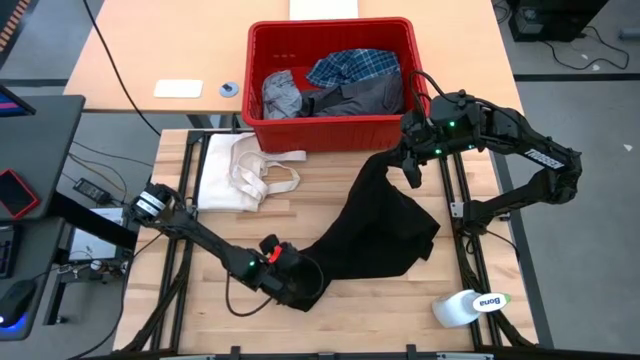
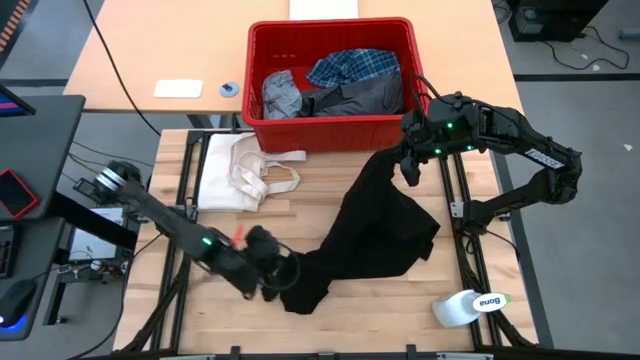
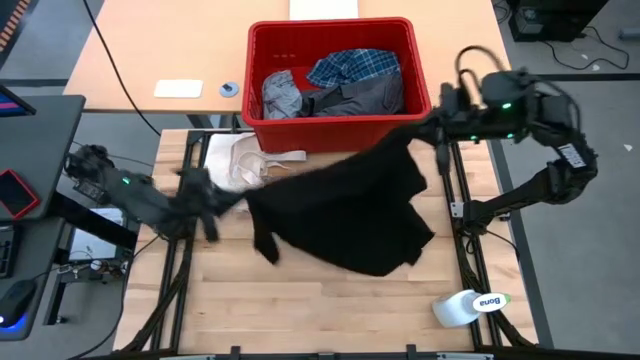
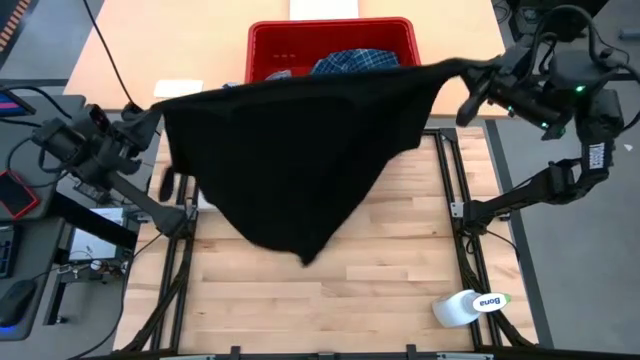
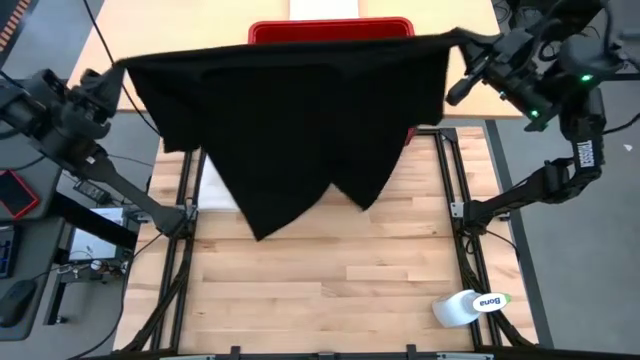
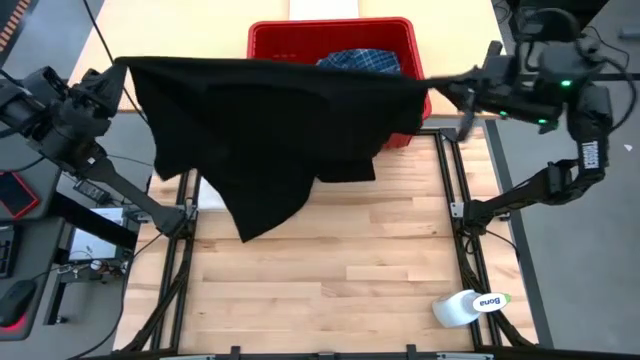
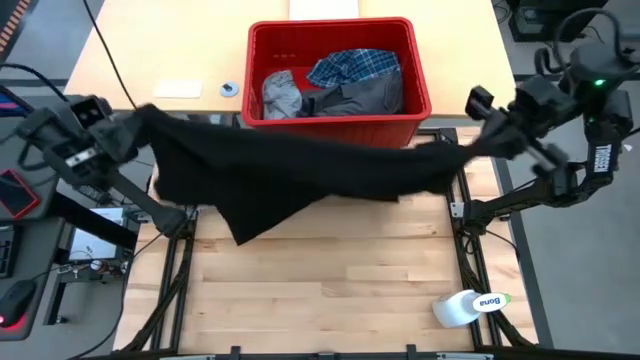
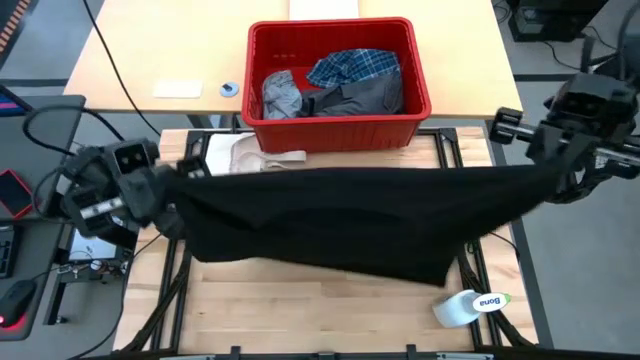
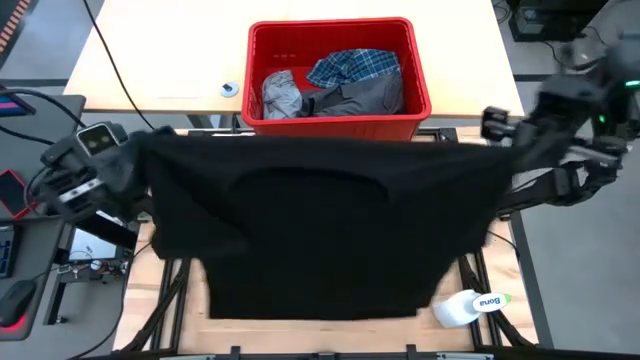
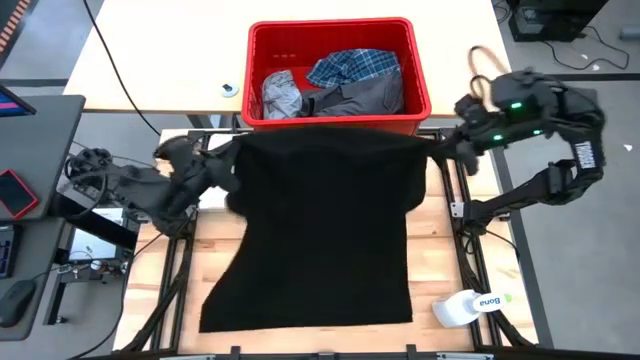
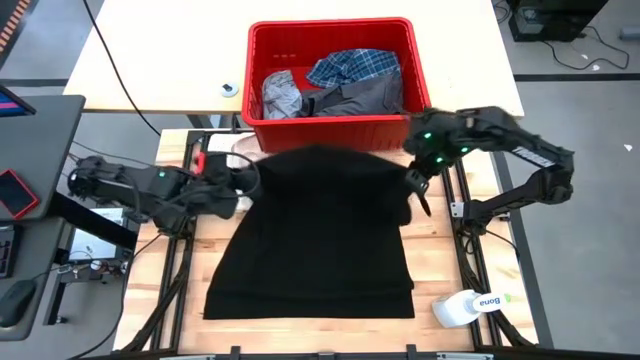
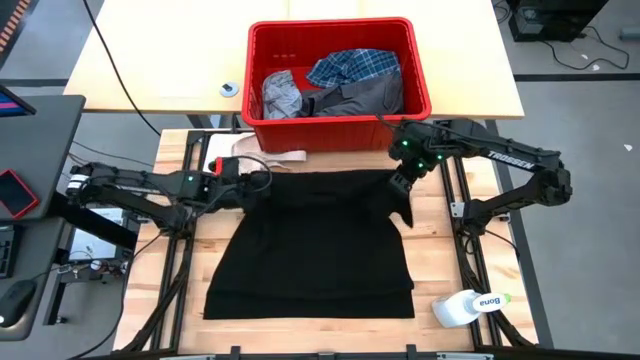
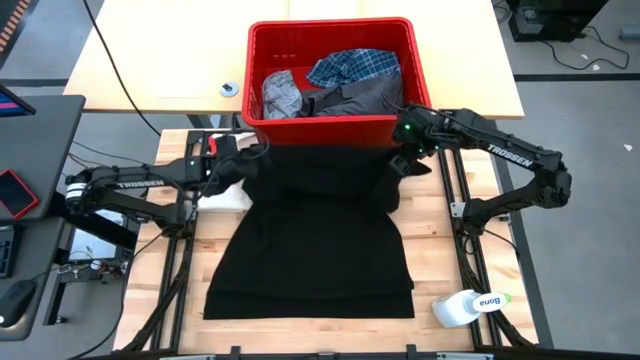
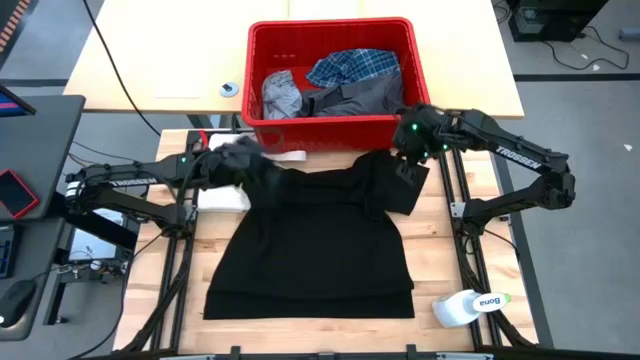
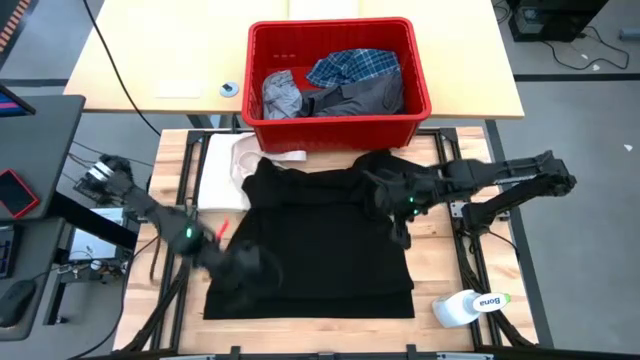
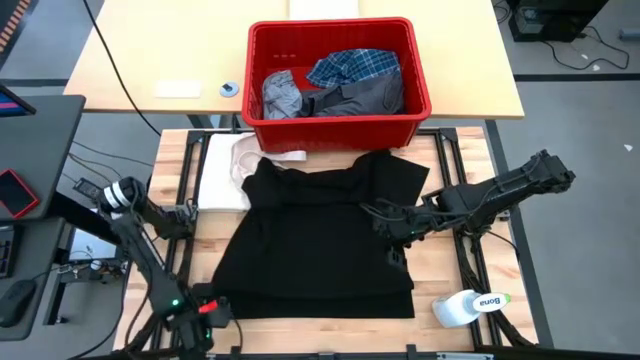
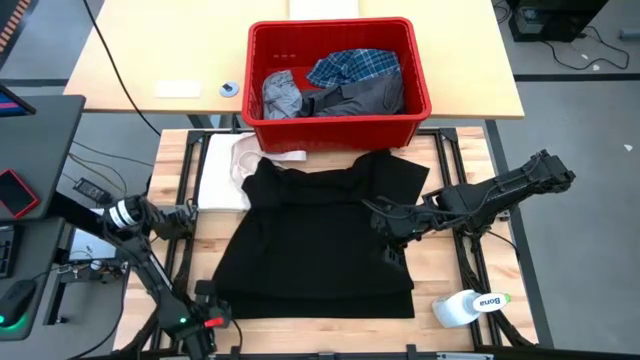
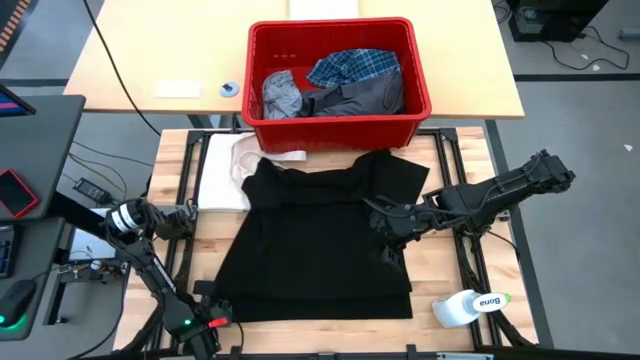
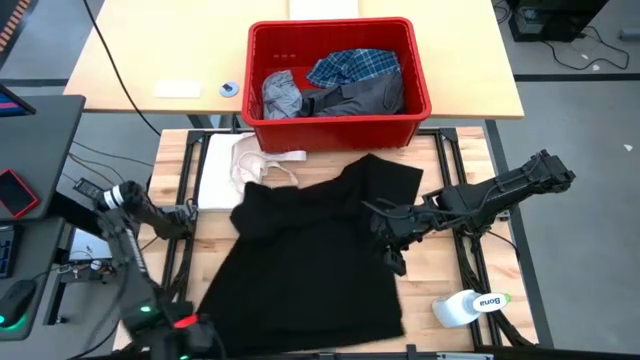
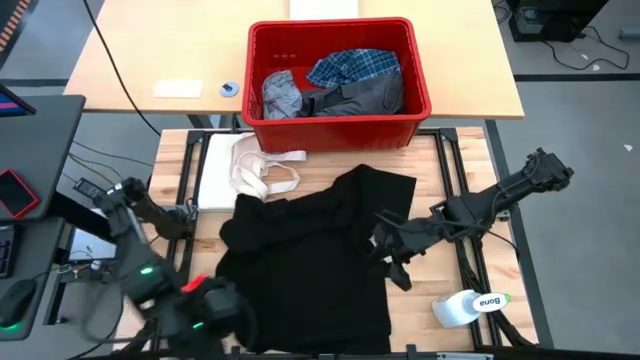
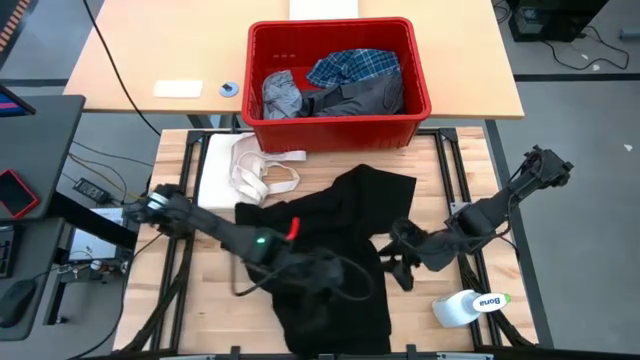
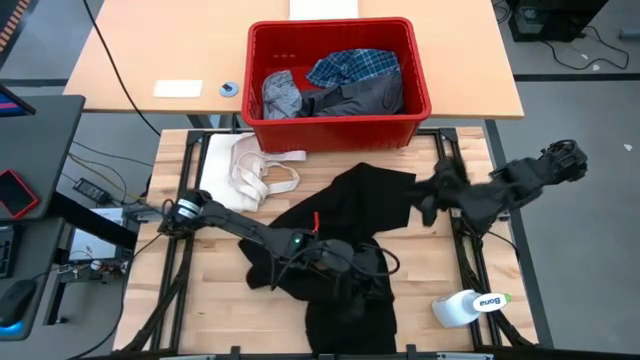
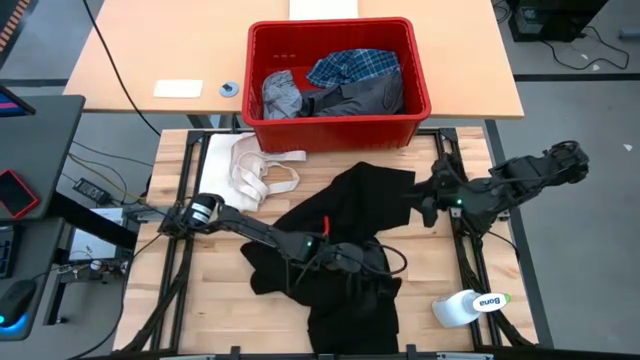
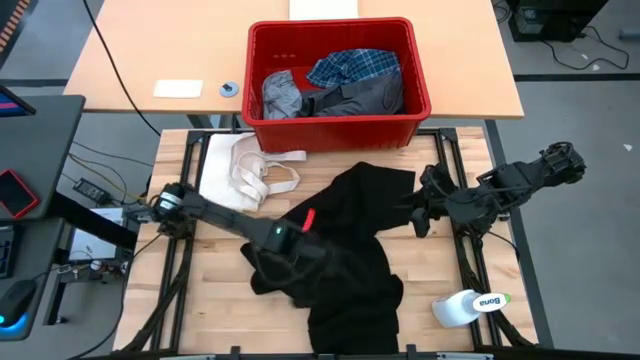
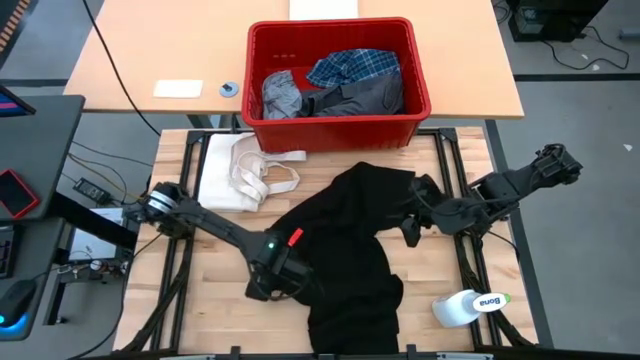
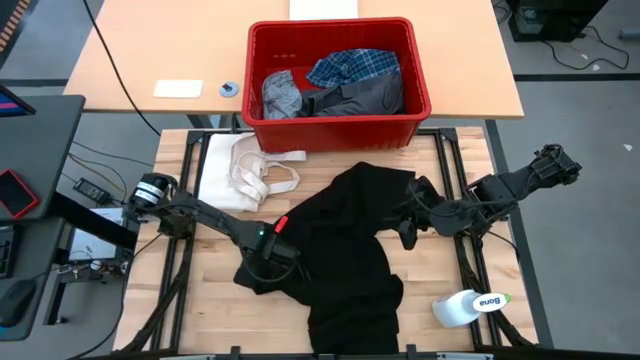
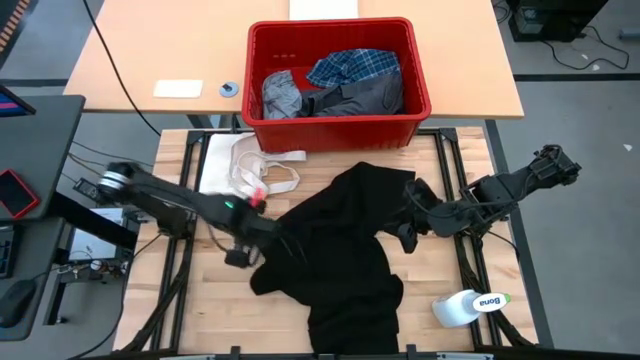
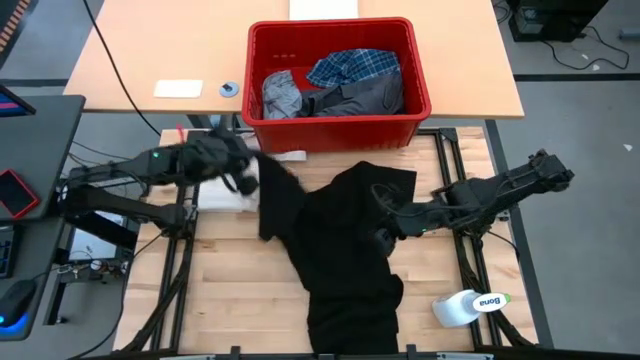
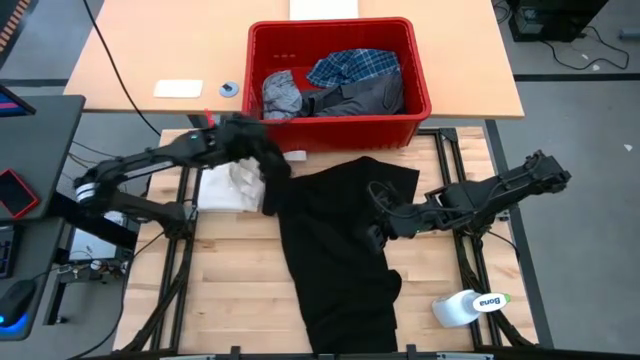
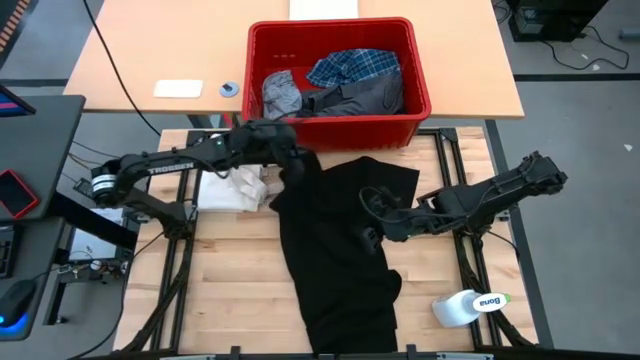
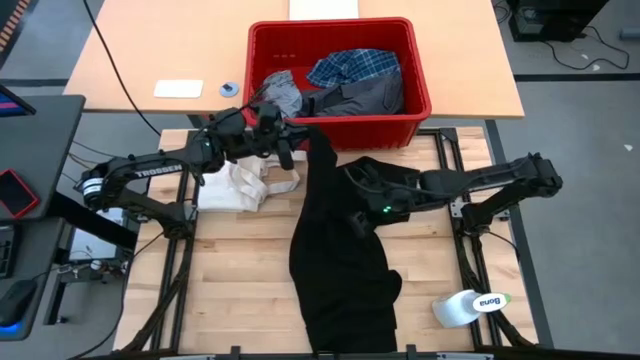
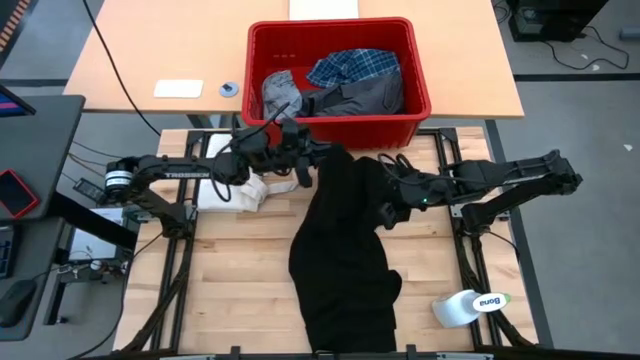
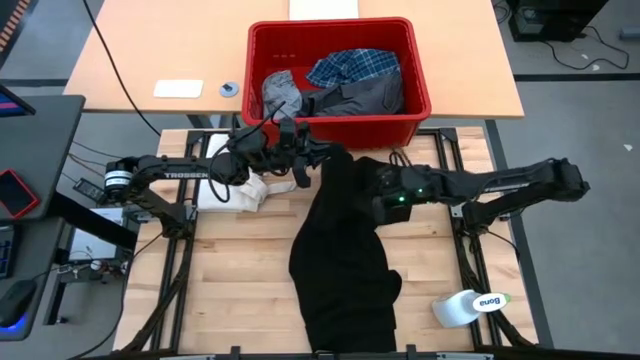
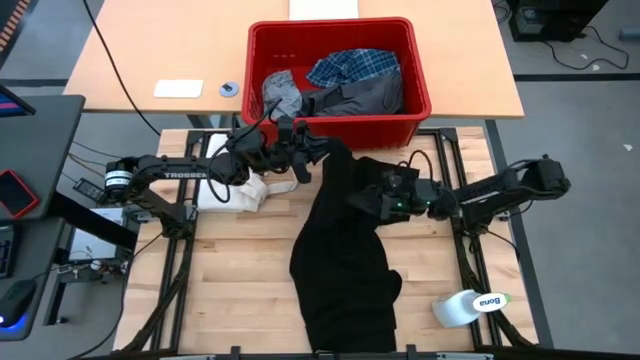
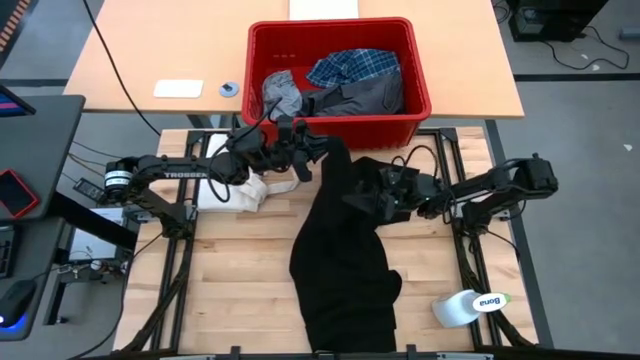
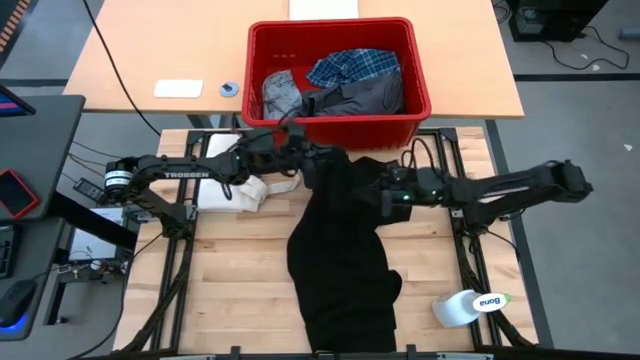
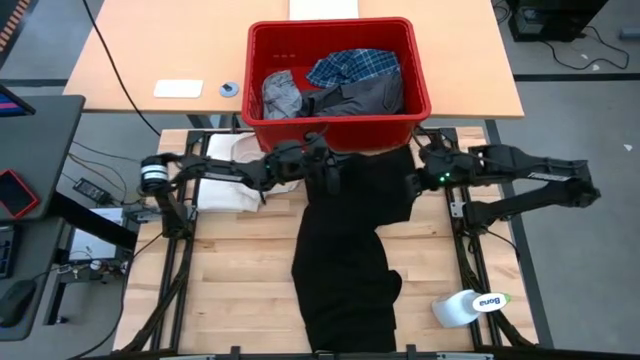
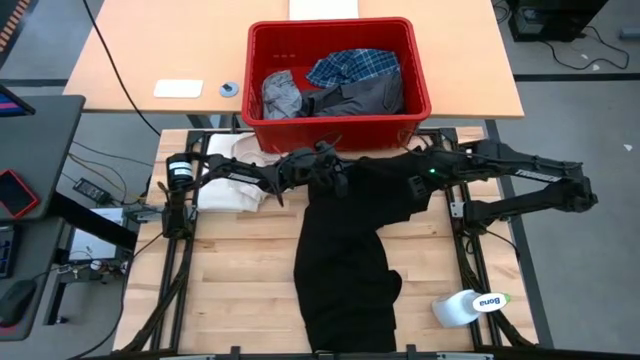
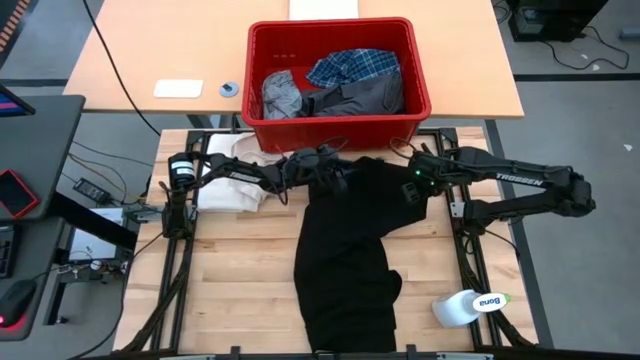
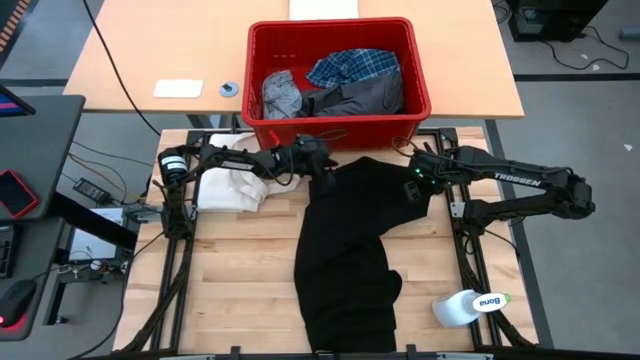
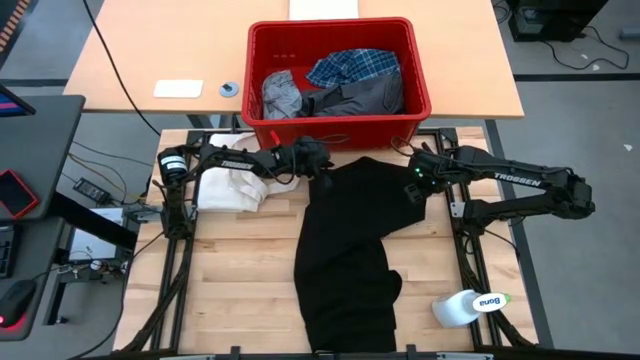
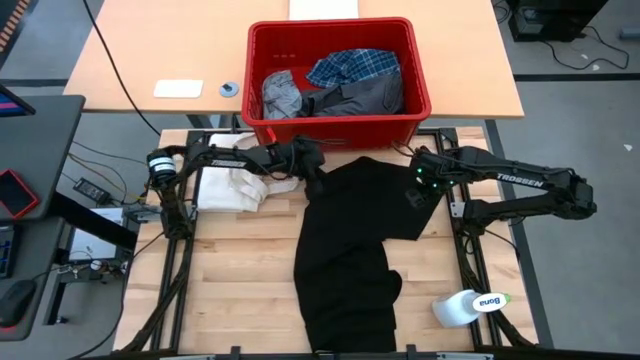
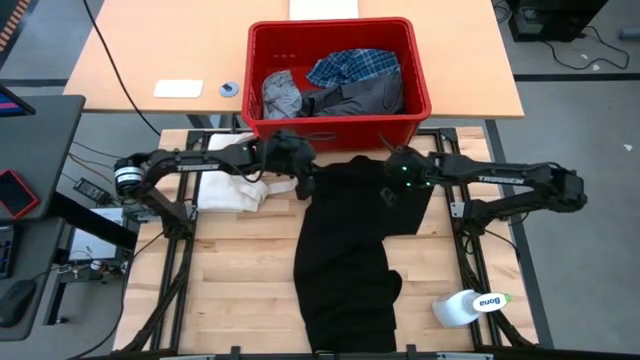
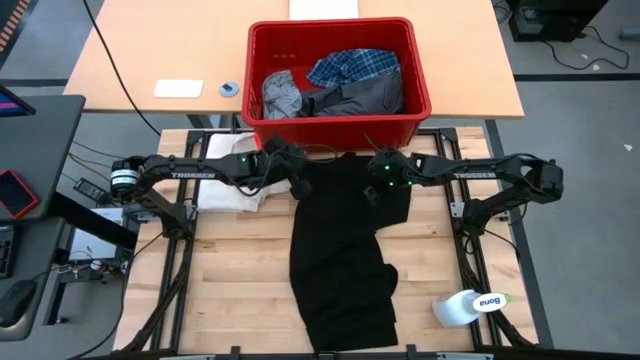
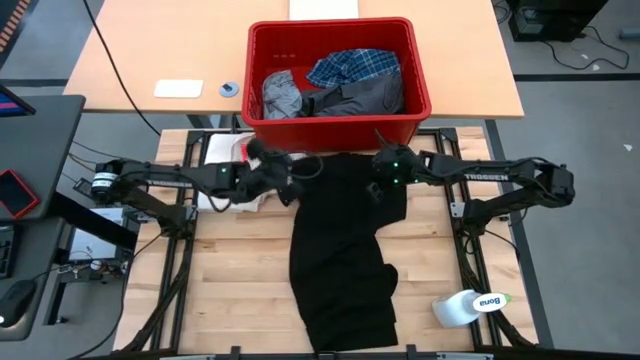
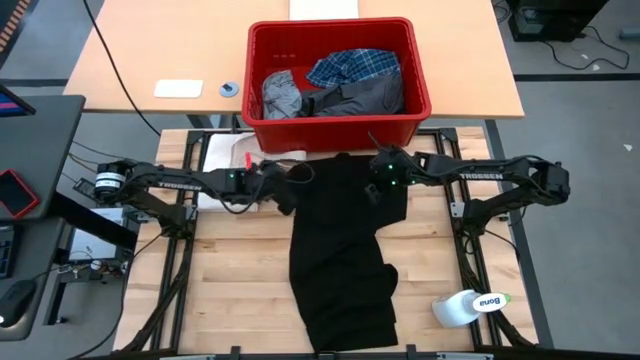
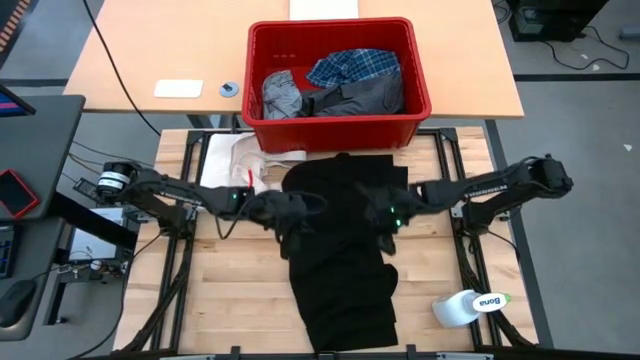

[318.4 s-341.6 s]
Task: Fold Laundry from Bin
Fold the black shirt
